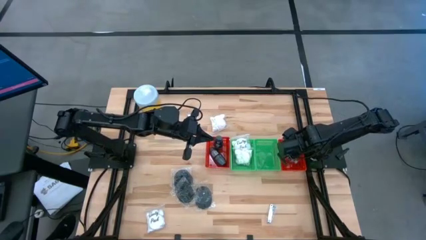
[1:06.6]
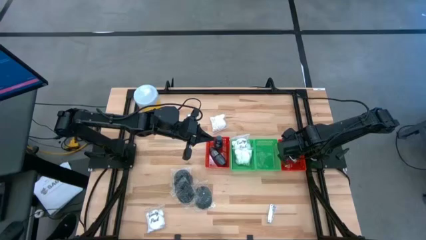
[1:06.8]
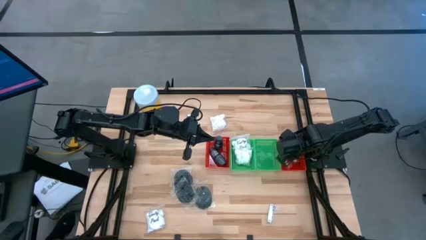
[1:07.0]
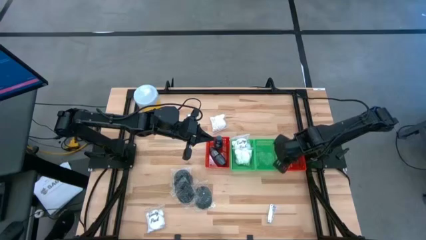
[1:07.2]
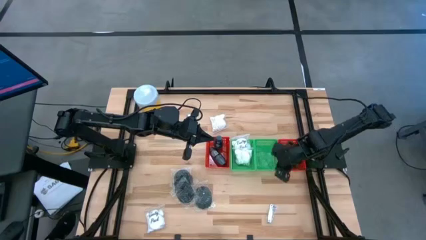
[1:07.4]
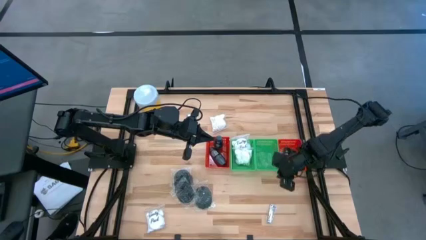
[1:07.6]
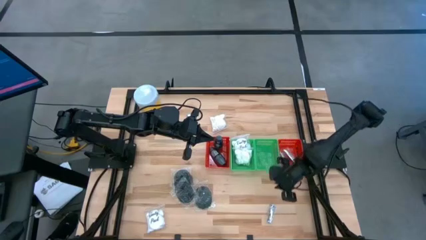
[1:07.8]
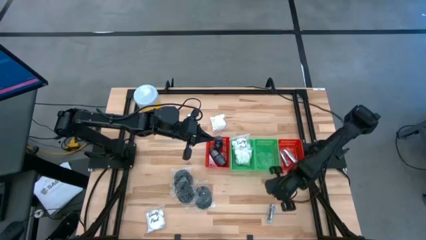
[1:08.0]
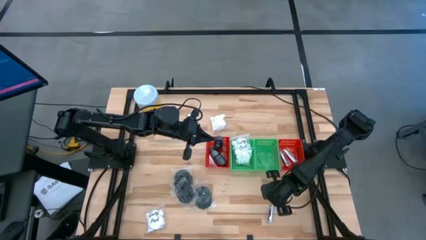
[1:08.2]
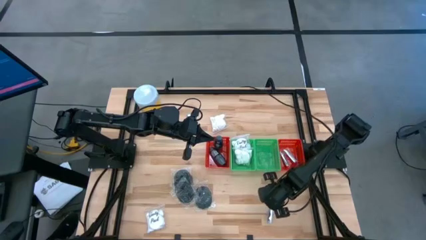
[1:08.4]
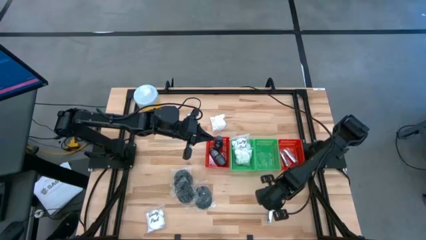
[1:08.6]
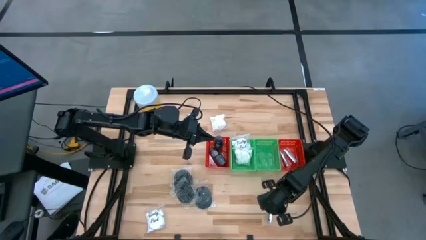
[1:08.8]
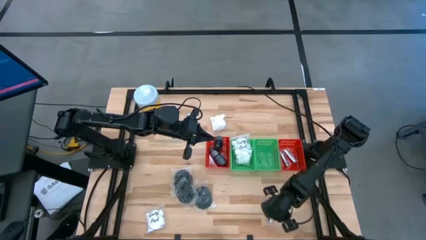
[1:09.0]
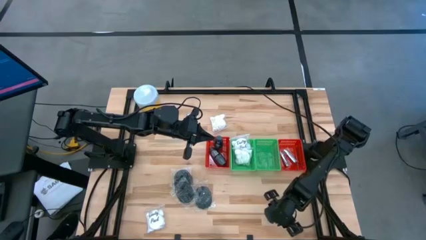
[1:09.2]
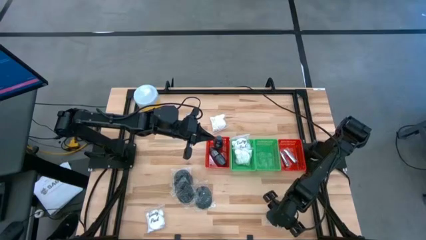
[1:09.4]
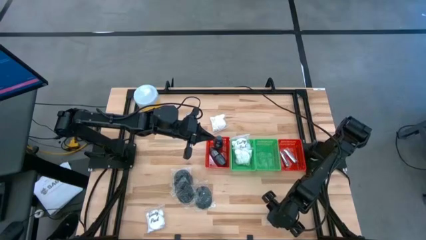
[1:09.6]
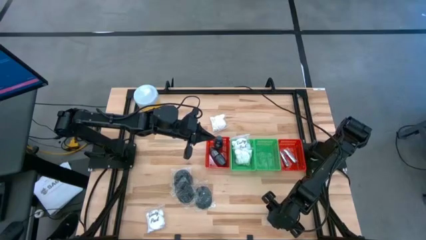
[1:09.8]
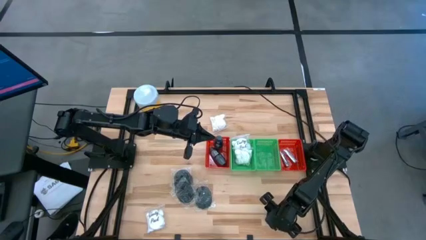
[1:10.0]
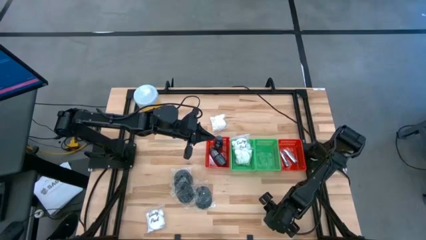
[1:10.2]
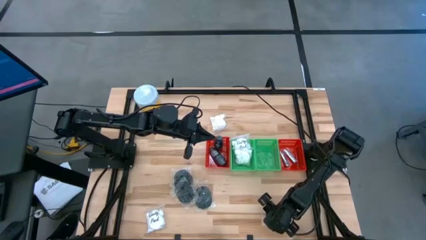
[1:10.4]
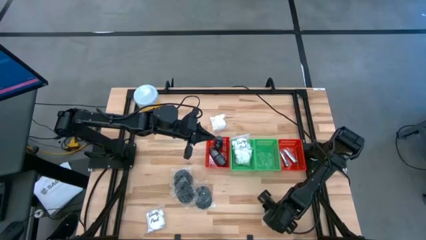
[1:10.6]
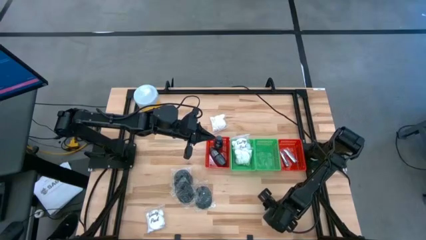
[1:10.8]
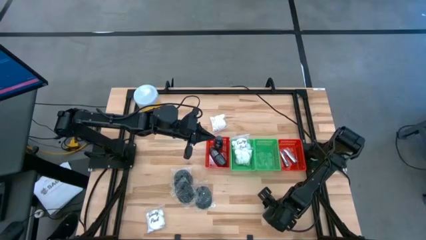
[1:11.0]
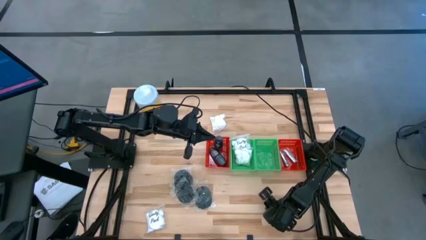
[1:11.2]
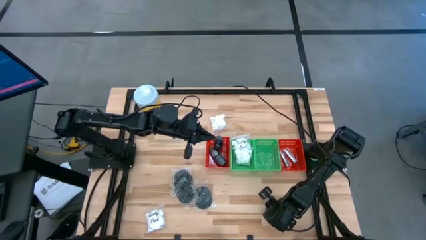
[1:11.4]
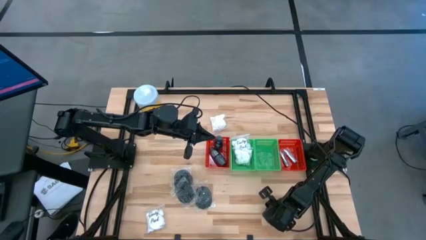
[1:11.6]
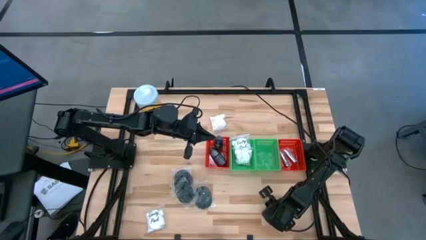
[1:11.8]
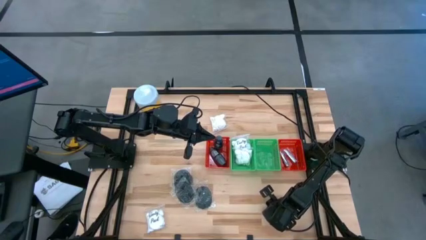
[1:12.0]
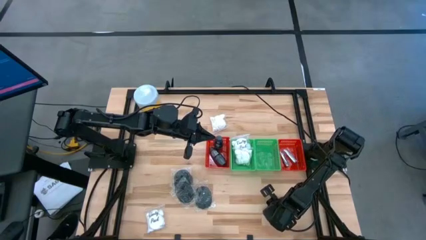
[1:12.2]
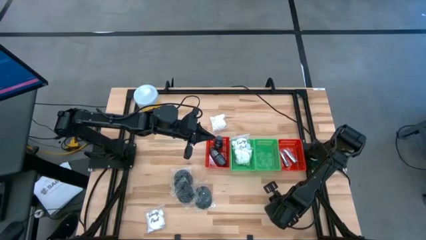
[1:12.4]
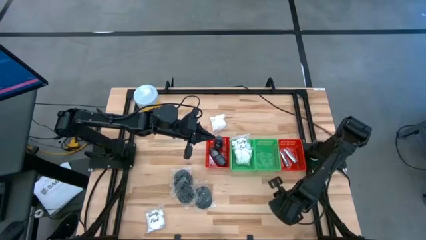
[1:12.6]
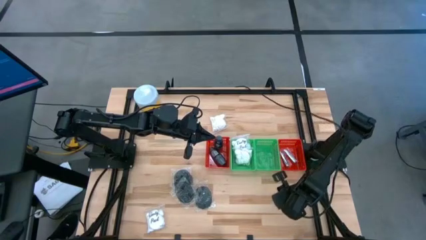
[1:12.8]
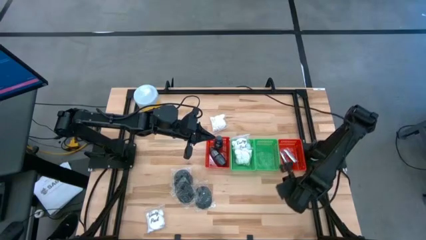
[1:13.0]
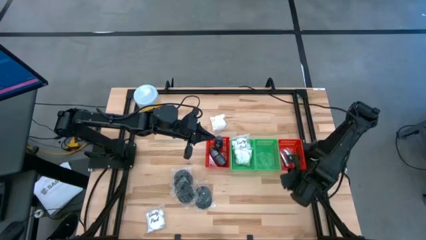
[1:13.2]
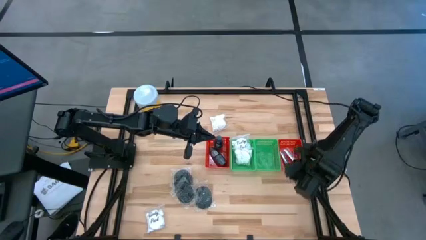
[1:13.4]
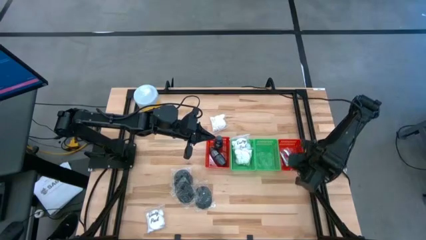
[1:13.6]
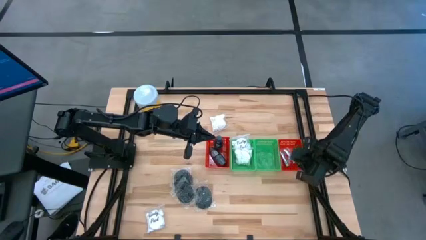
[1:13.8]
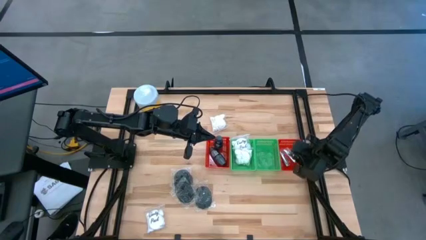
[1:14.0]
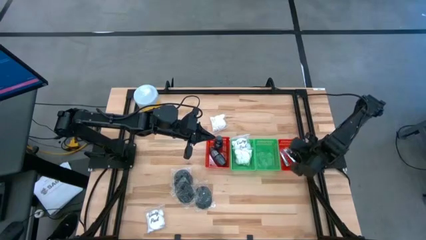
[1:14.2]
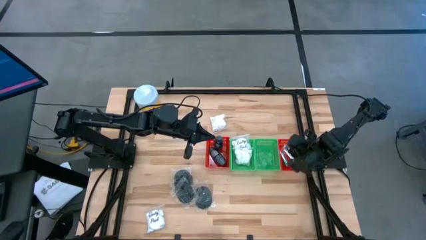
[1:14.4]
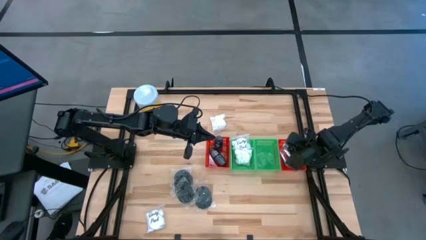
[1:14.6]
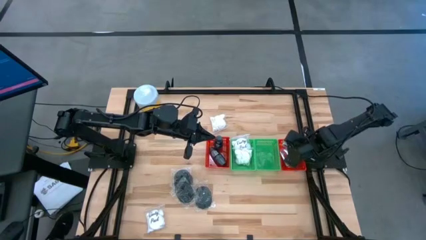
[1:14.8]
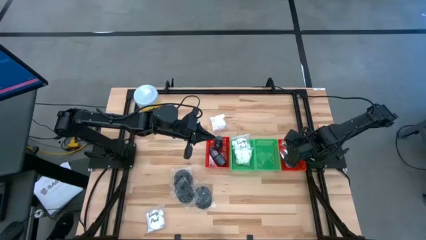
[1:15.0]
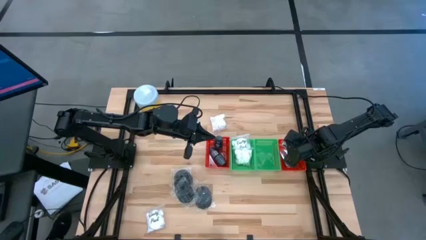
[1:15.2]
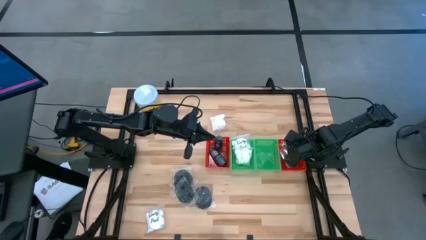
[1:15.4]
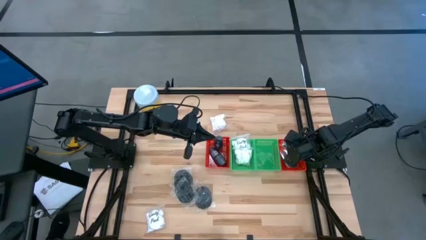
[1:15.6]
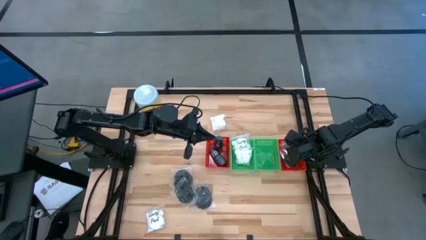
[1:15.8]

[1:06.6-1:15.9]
Task: Pick & Place Travel size toiletries
Put the silver nail cutter into the right red bin

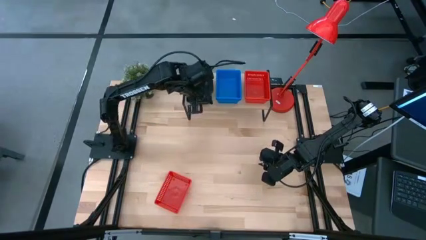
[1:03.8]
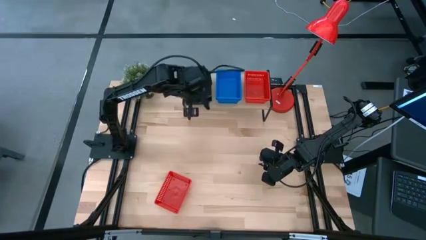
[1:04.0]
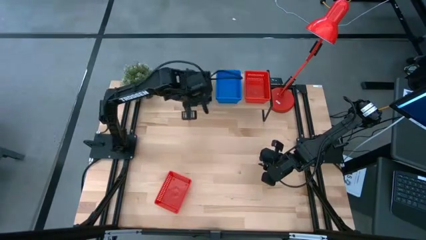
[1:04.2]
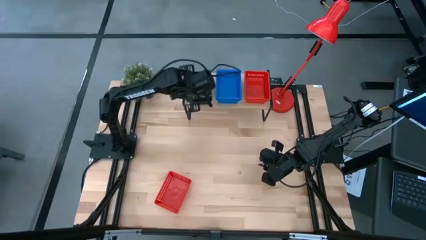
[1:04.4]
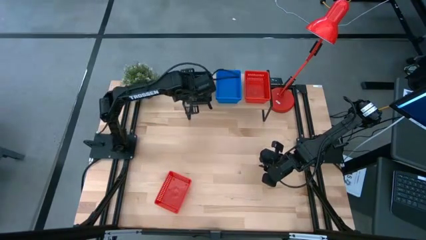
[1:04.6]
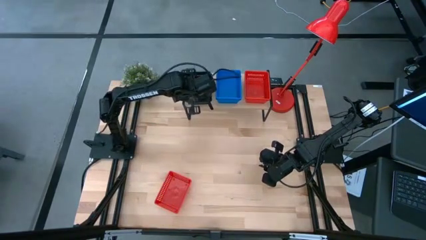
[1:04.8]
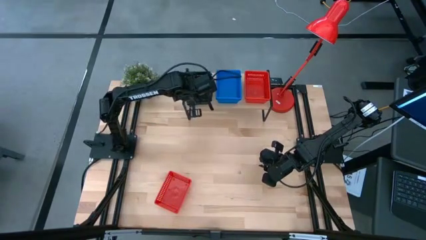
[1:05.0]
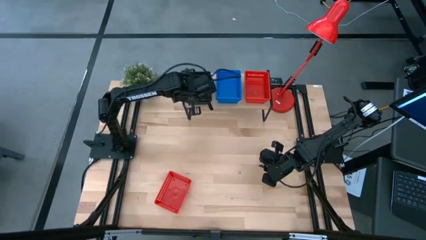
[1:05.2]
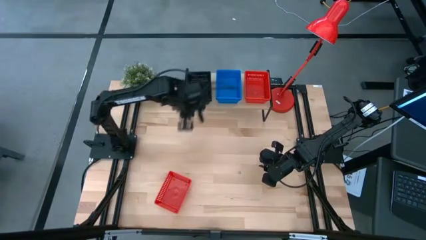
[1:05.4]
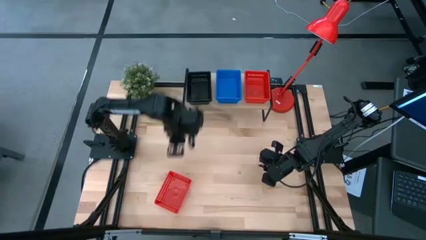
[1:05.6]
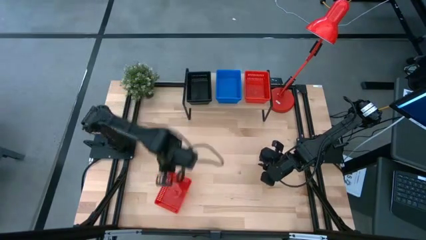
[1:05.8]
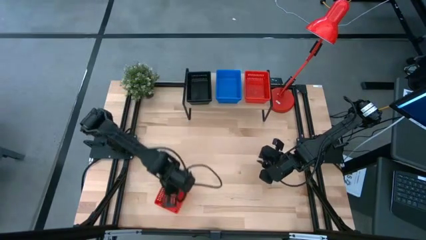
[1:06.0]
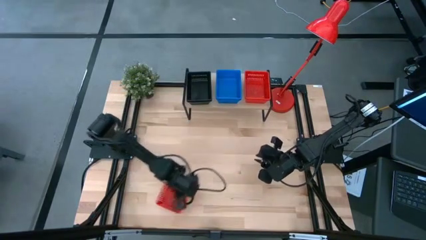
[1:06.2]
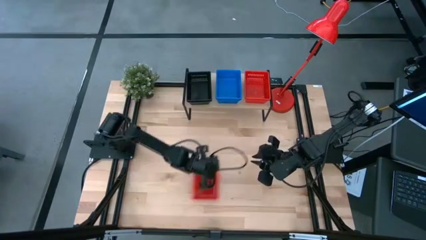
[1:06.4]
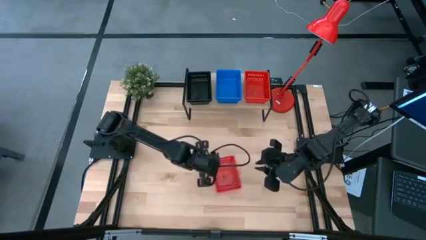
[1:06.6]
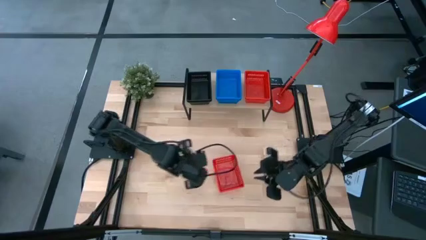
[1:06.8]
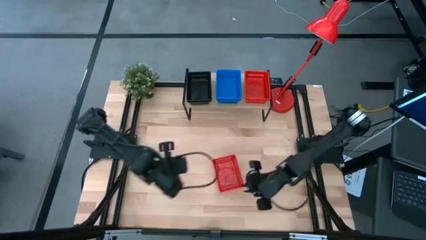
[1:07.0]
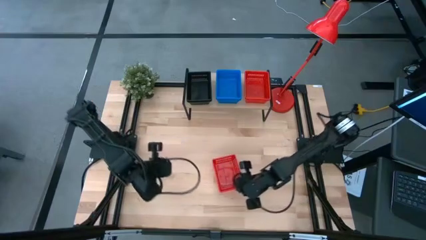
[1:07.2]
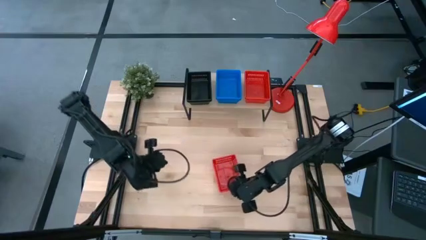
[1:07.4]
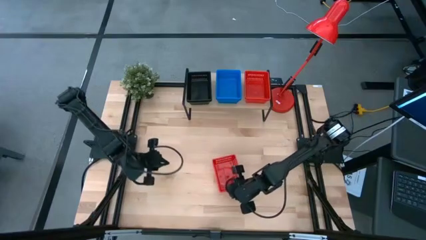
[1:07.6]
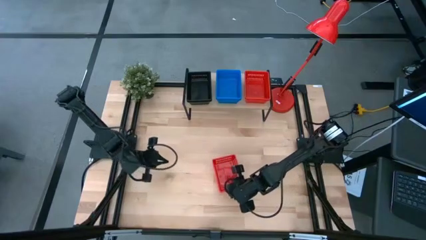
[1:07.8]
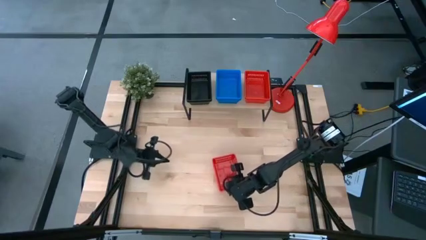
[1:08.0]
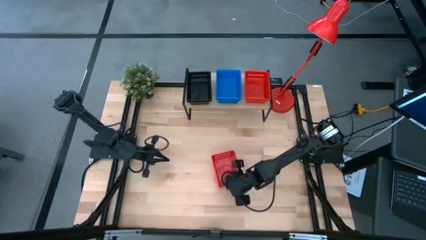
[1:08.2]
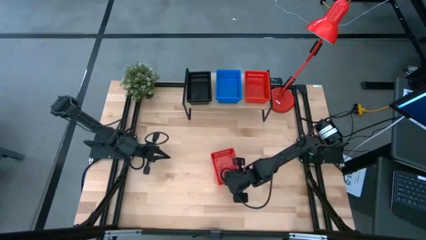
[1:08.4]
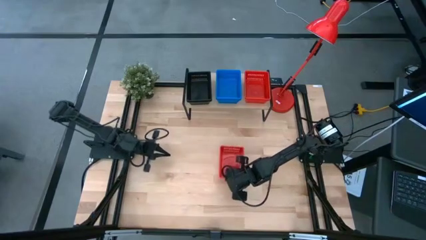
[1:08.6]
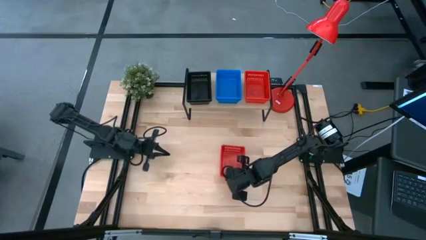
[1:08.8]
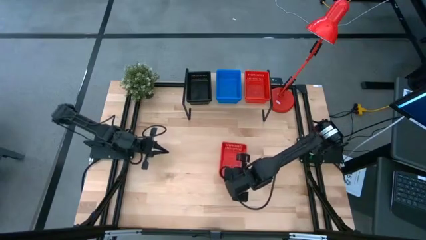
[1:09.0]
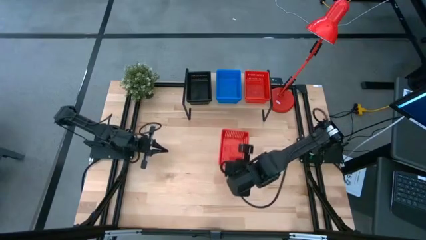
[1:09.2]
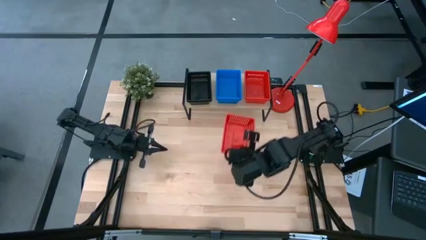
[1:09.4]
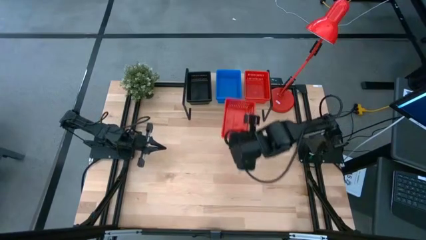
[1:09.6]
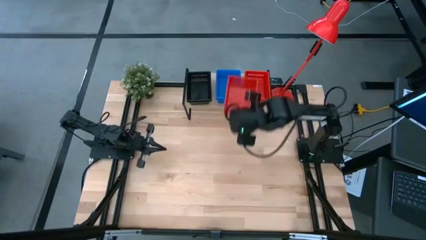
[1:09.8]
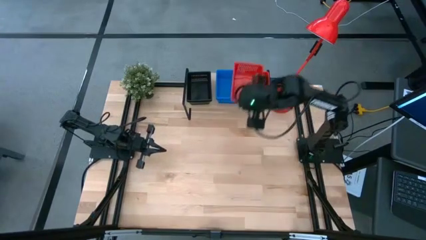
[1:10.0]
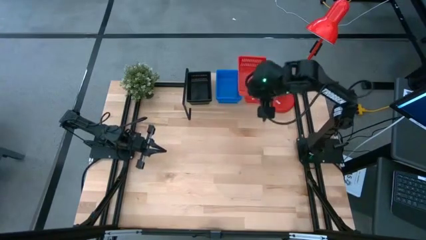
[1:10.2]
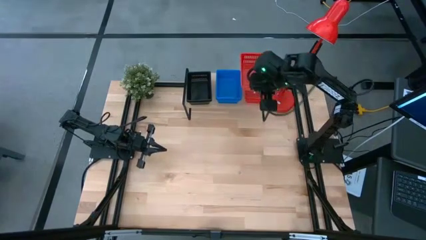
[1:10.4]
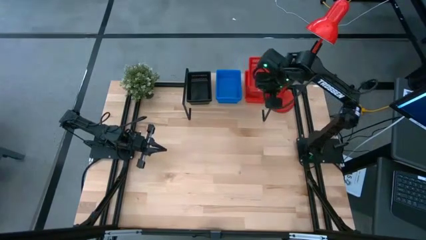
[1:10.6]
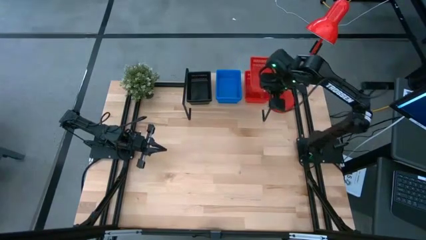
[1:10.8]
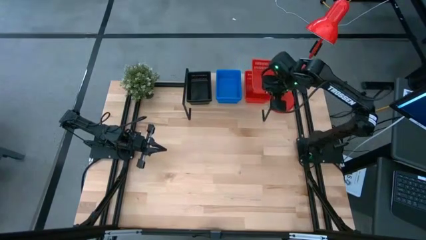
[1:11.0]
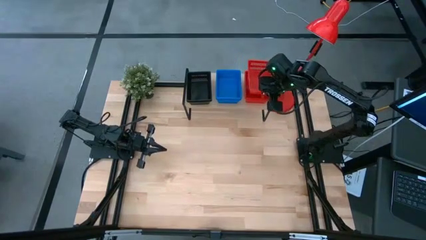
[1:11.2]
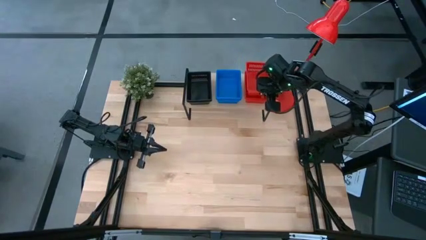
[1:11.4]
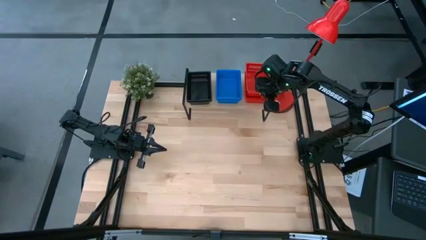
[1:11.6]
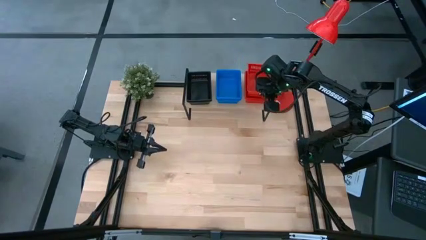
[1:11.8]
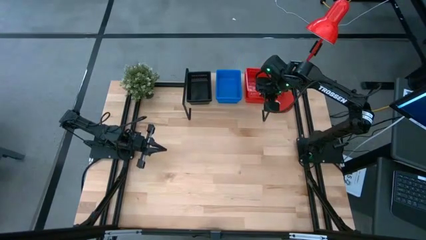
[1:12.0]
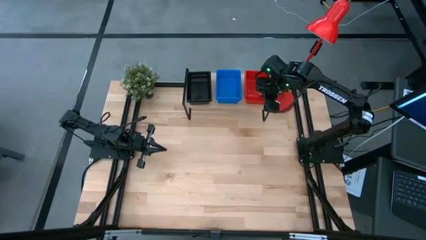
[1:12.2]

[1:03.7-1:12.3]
Task: Stack baskets on shelf by color
Stack the red basket on top of the stacked red basket on the shelf
